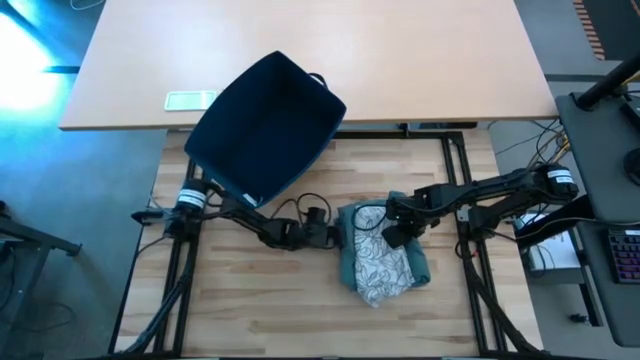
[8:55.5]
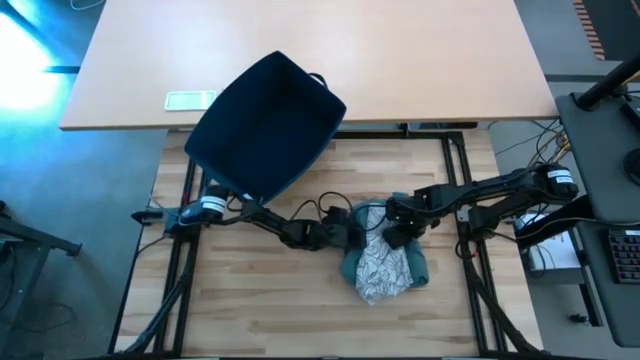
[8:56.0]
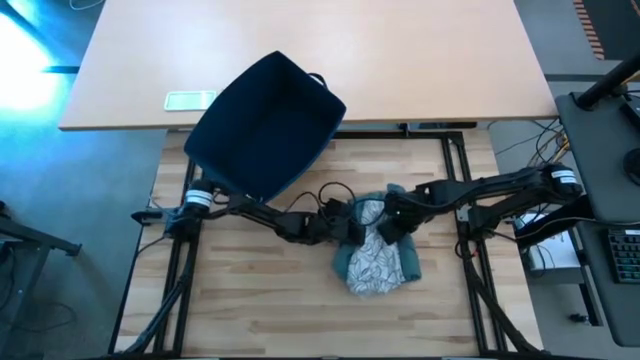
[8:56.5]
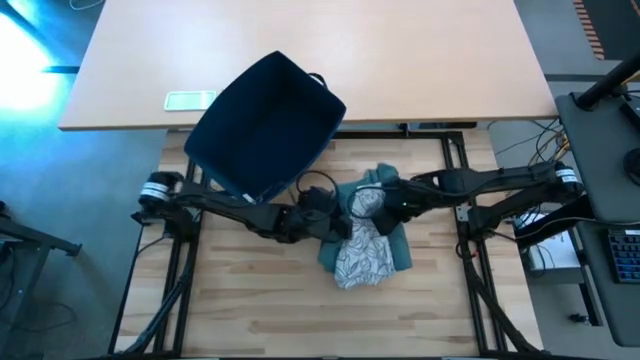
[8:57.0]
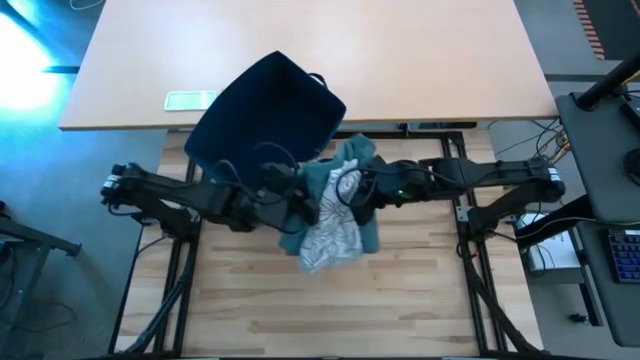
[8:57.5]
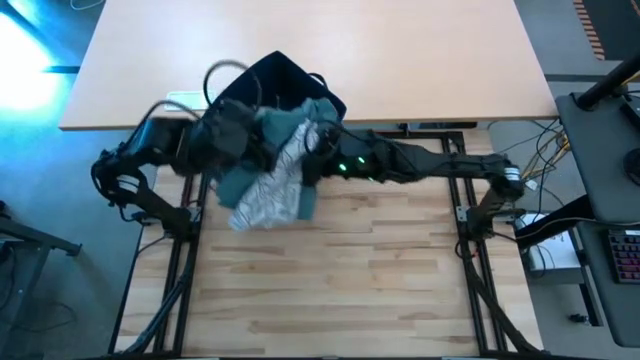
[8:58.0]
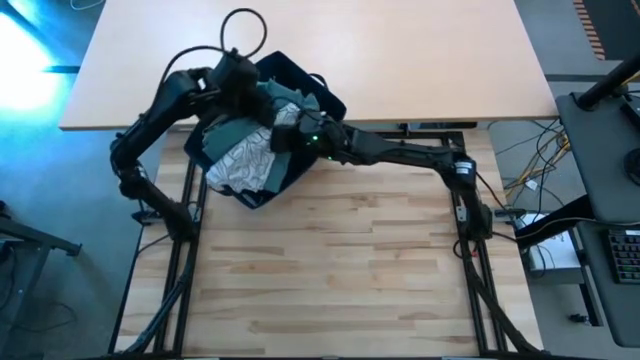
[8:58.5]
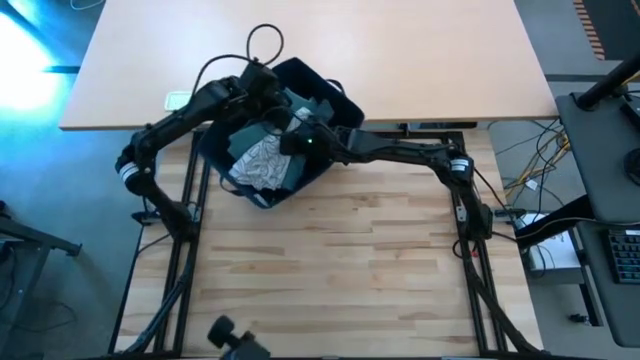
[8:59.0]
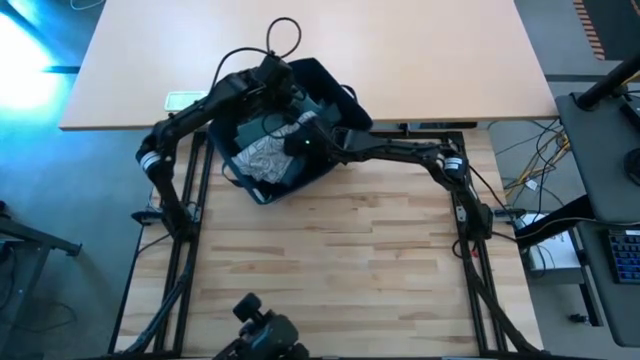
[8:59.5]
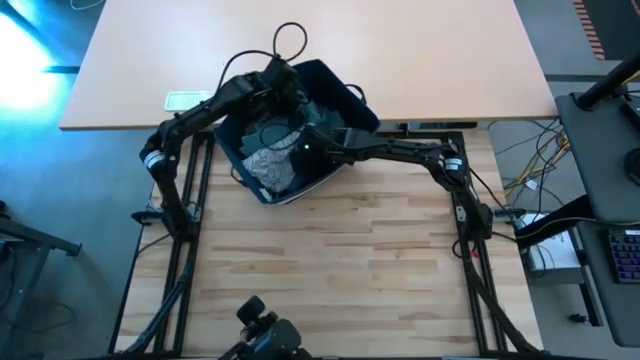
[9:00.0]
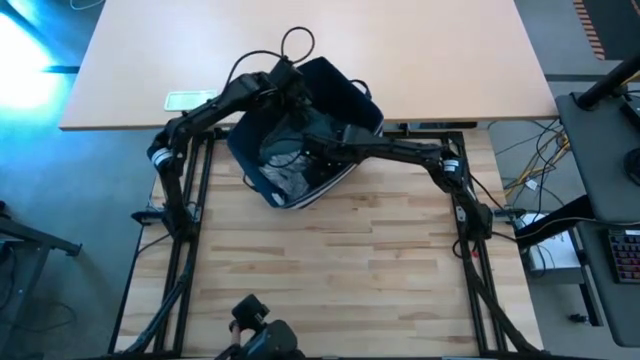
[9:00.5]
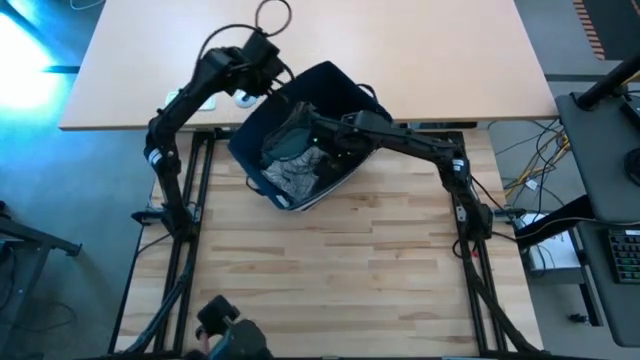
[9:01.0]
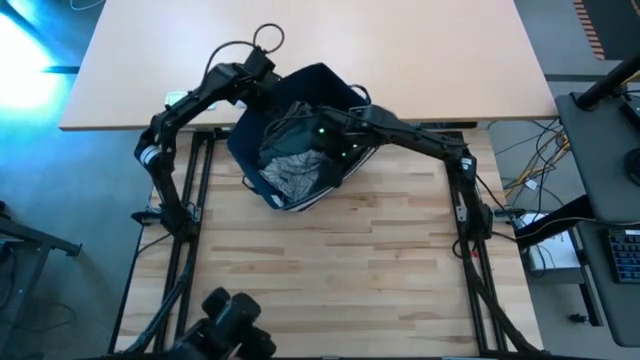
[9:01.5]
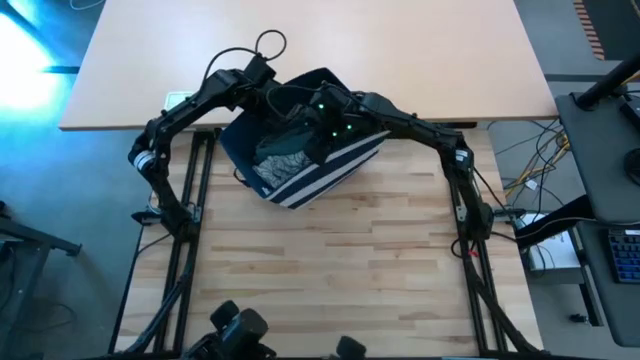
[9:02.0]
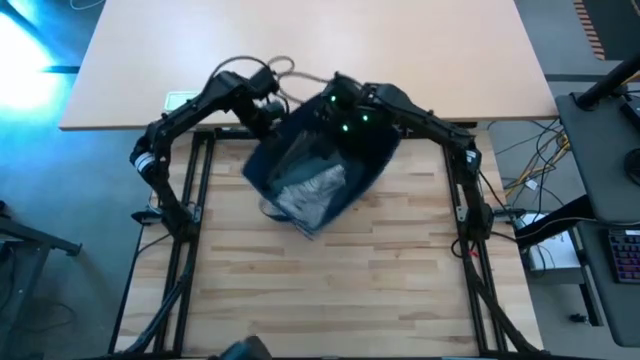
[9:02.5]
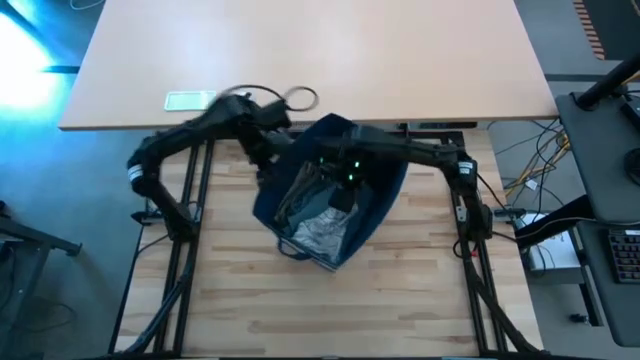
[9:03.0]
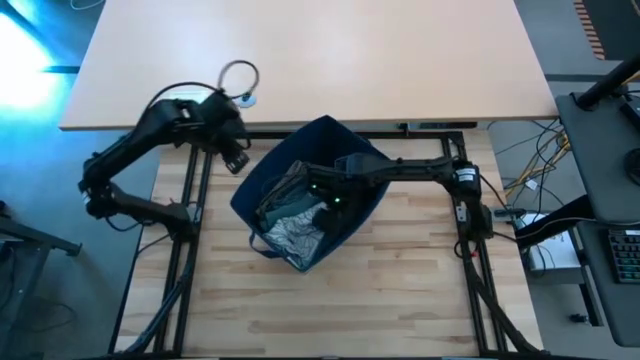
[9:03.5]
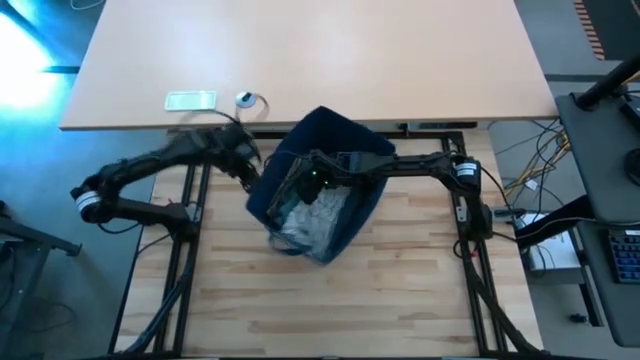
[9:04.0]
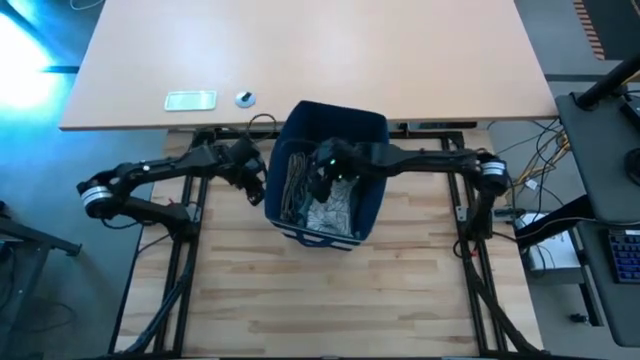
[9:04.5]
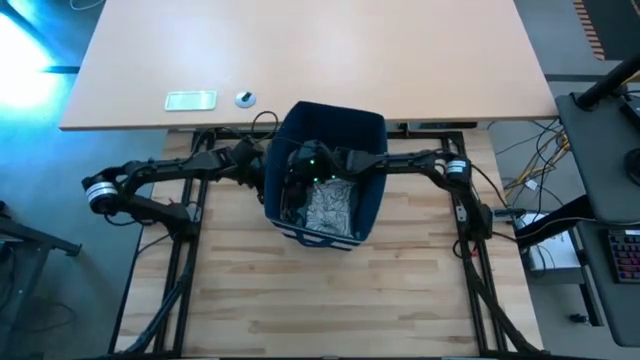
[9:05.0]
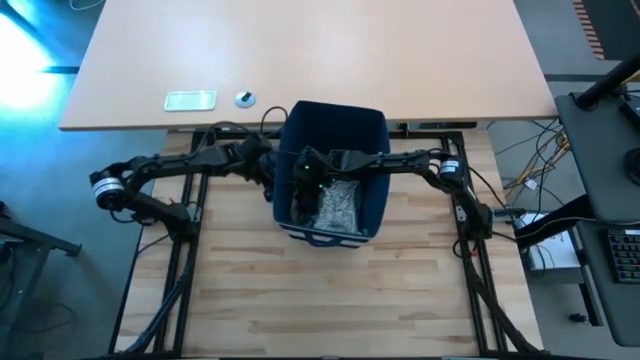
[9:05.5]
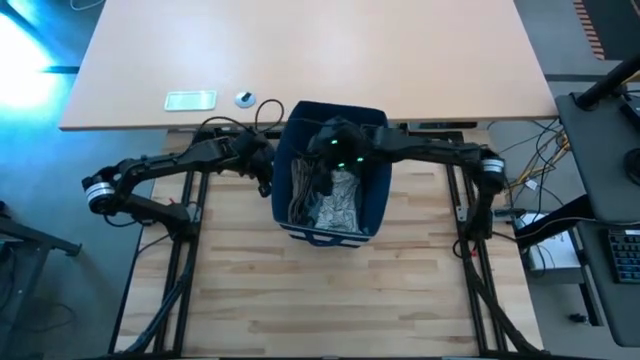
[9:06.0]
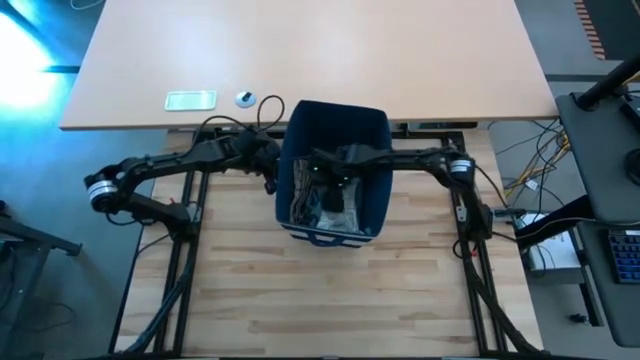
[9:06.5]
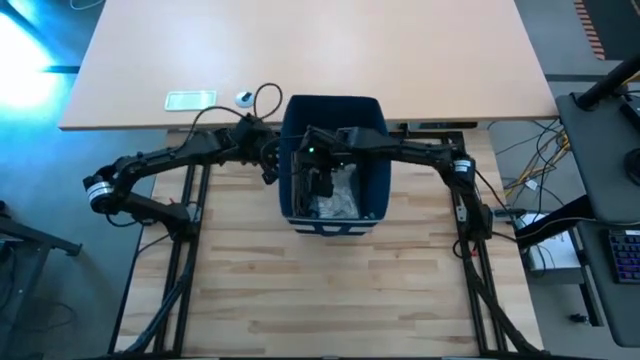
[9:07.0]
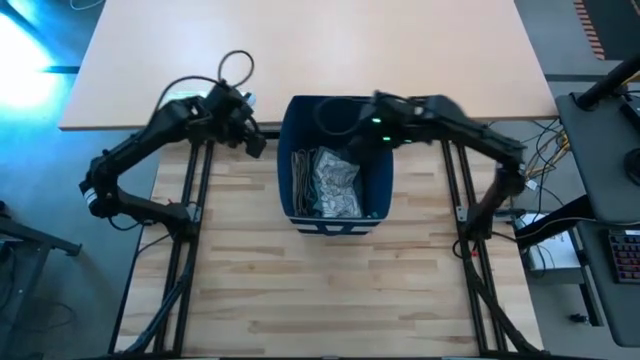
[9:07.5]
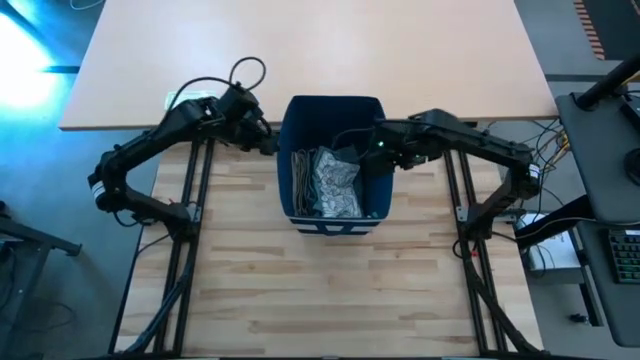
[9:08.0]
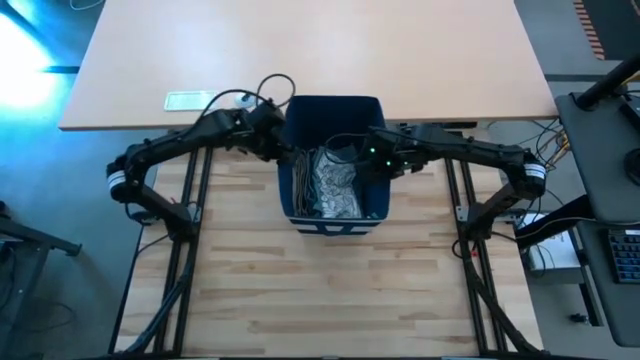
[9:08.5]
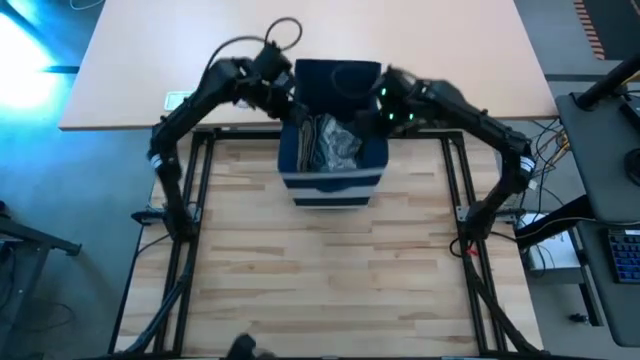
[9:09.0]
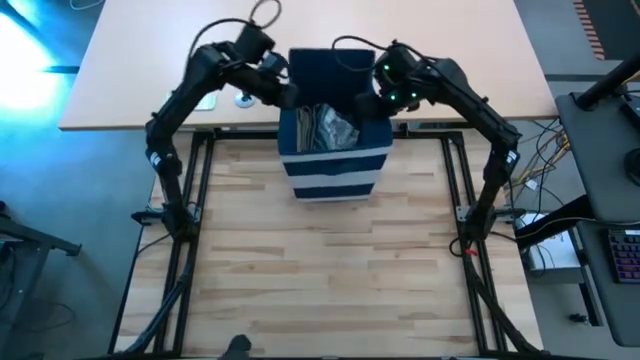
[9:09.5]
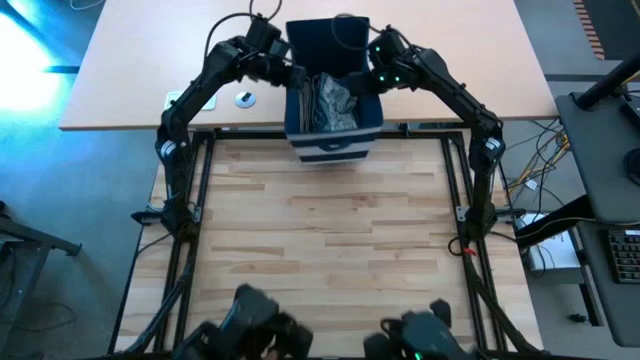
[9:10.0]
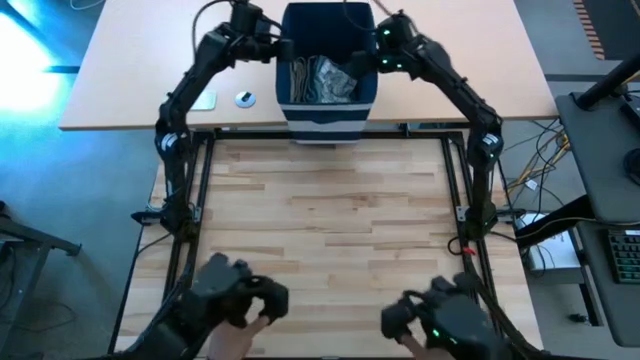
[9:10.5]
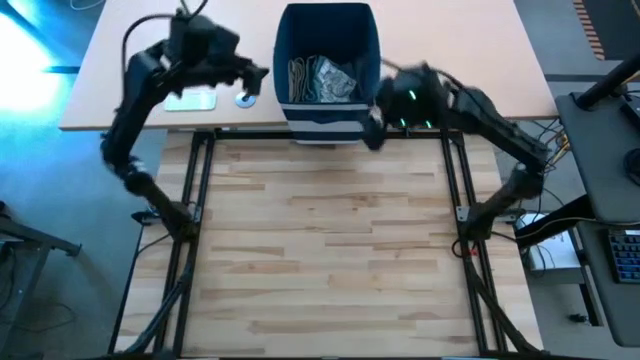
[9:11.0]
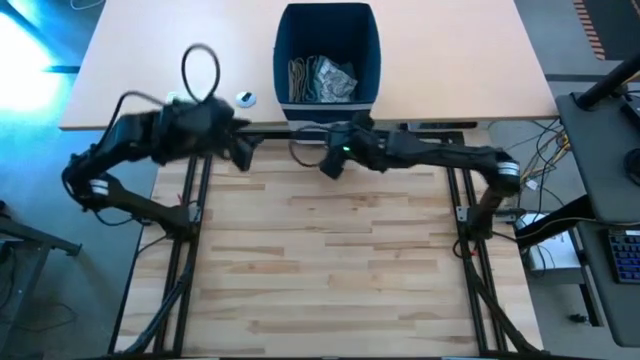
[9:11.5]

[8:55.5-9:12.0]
Task: Fold Laundry from Bin
Put the folded clothes into the laundry basket

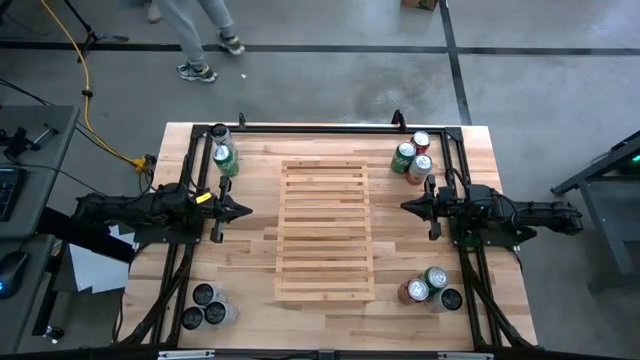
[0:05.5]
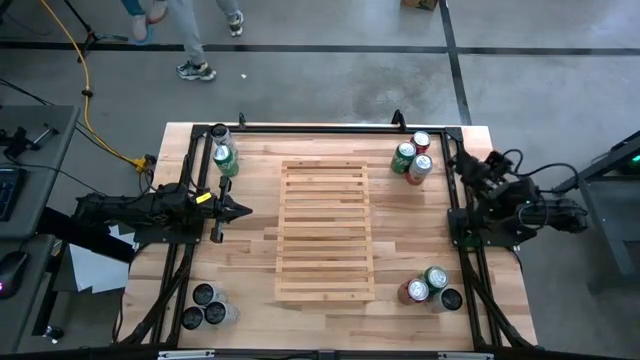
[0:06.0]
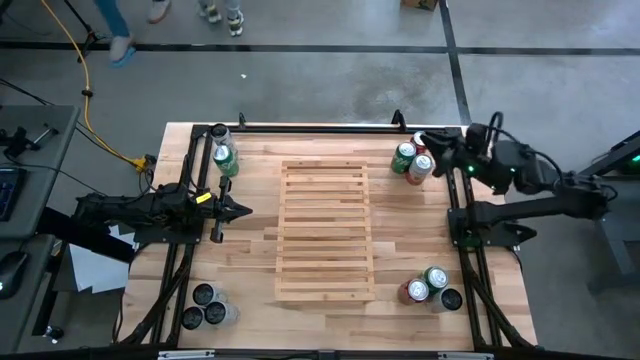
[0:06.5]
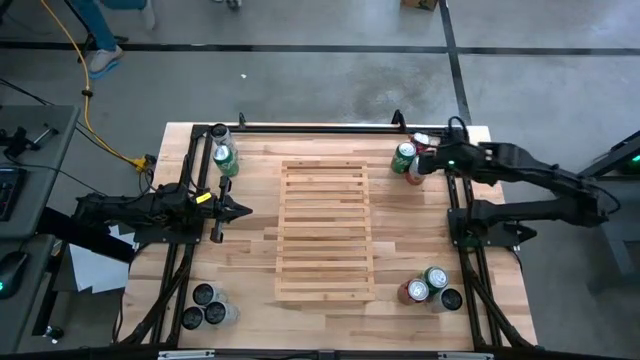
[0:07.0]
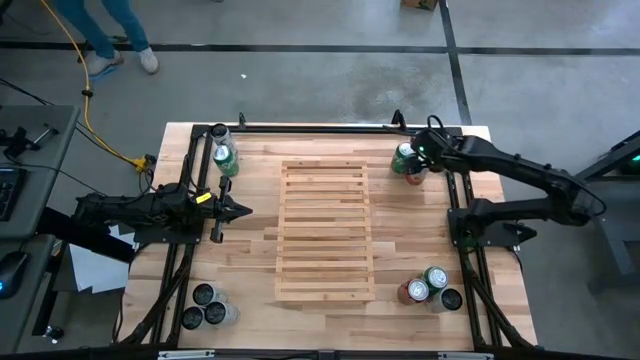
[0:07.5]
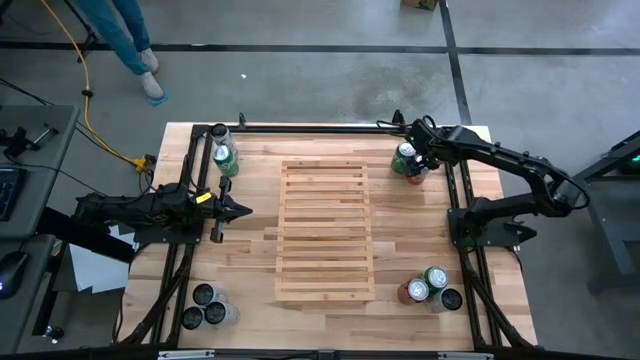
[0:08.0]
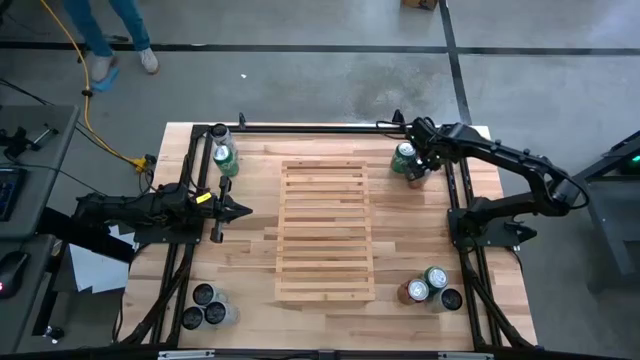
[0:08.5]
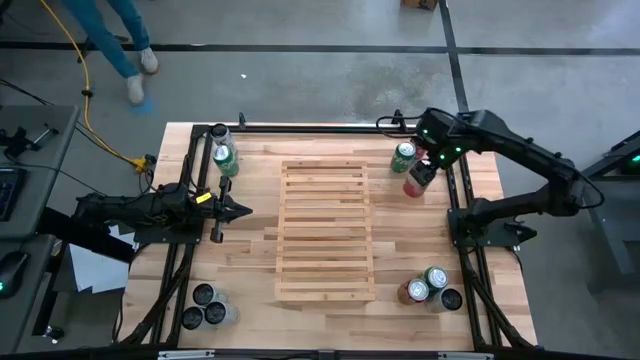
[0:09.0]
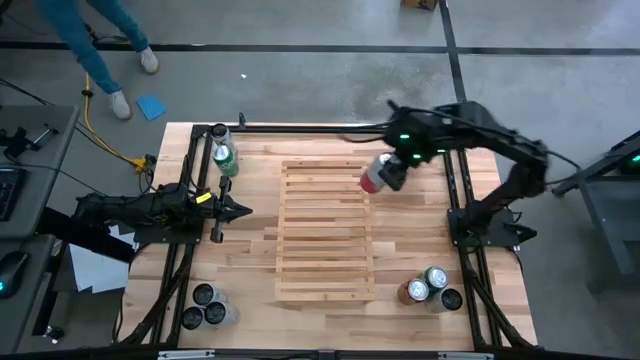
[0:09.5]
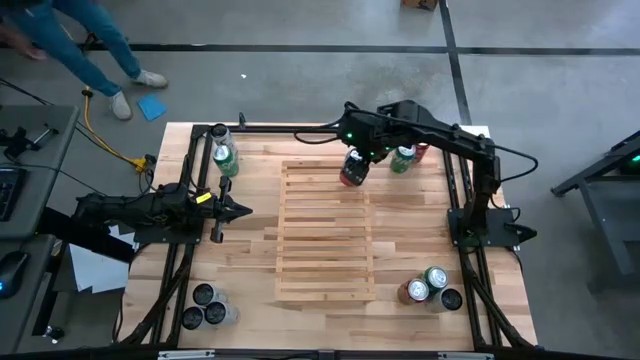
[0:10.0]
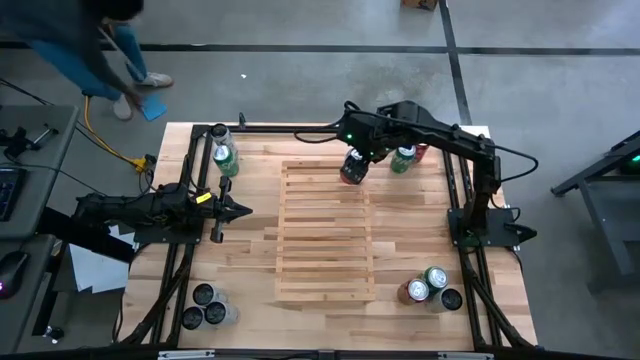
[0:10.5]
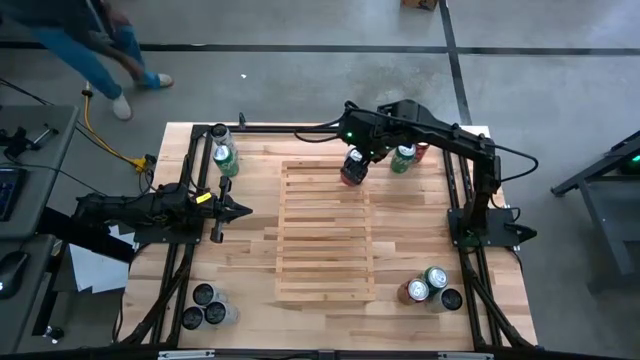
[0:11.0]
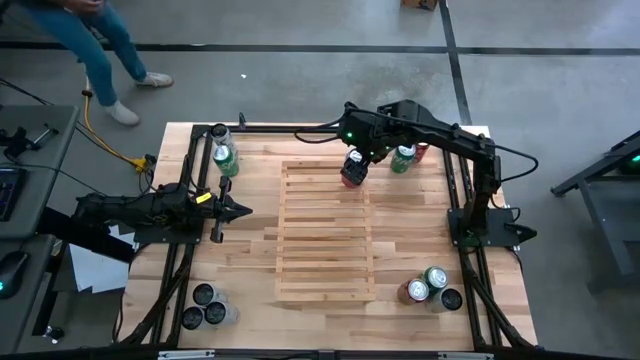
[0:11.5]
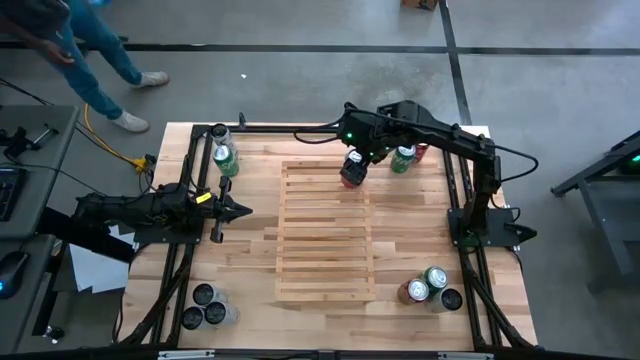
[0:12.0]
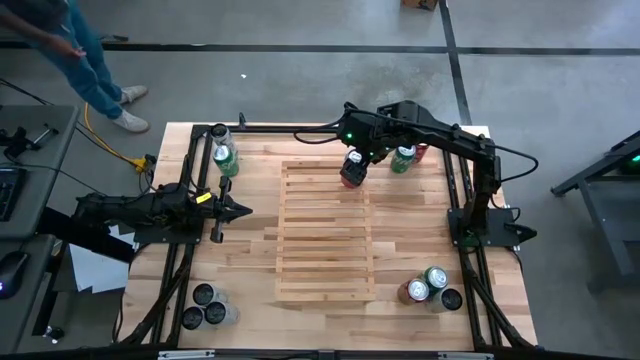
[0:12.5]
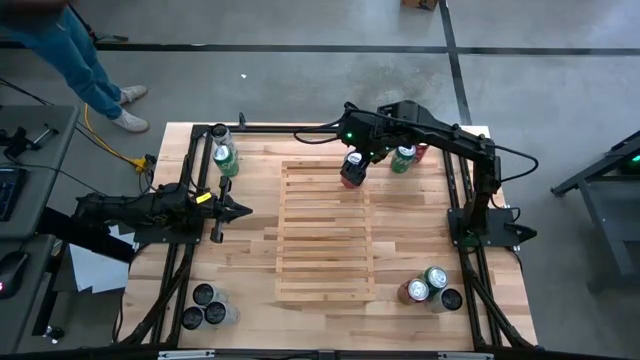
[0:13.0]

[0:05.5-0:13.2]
Task: Place canned beverage on shelf
Put the pink soda can on the shelf
